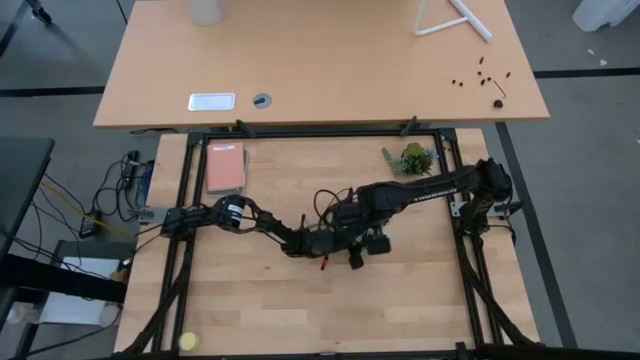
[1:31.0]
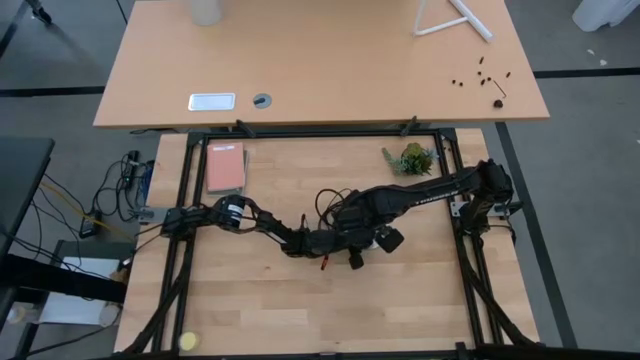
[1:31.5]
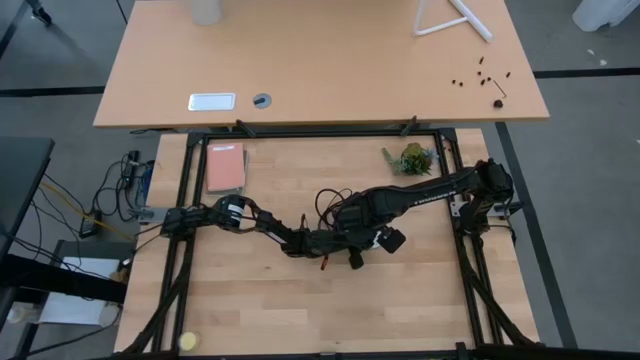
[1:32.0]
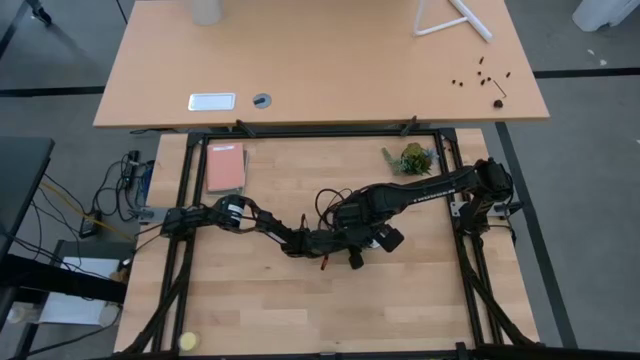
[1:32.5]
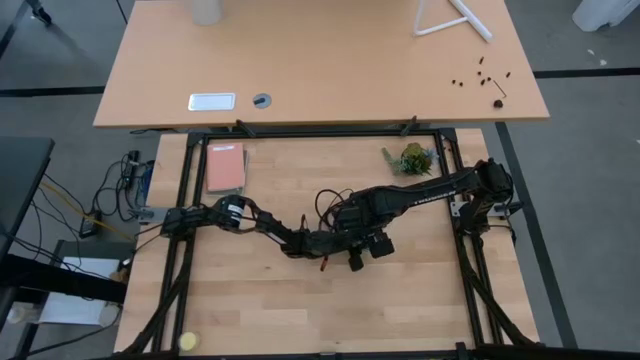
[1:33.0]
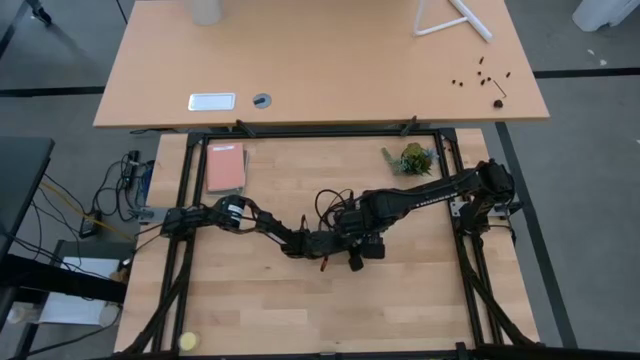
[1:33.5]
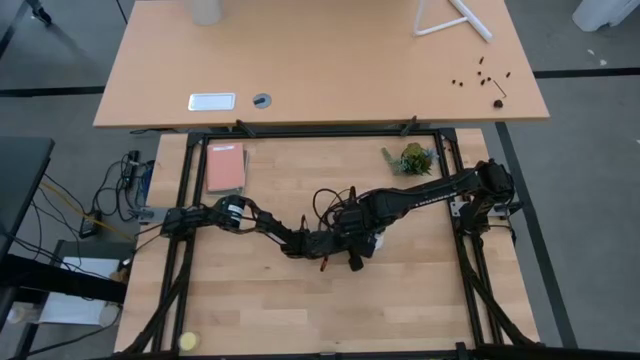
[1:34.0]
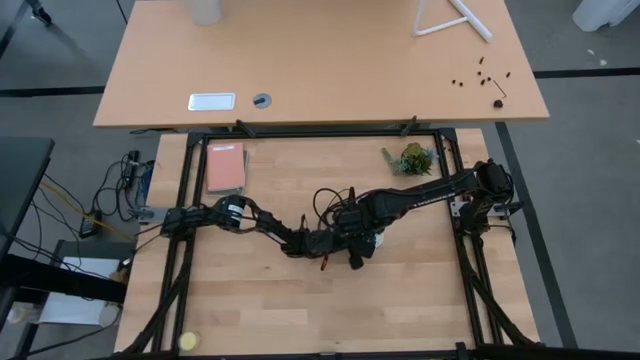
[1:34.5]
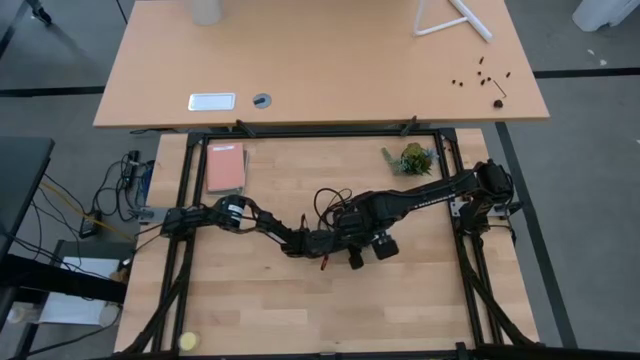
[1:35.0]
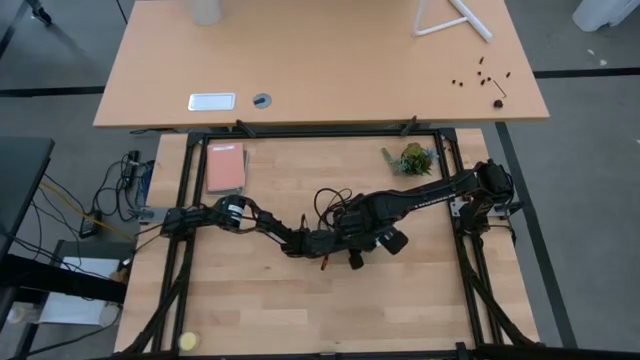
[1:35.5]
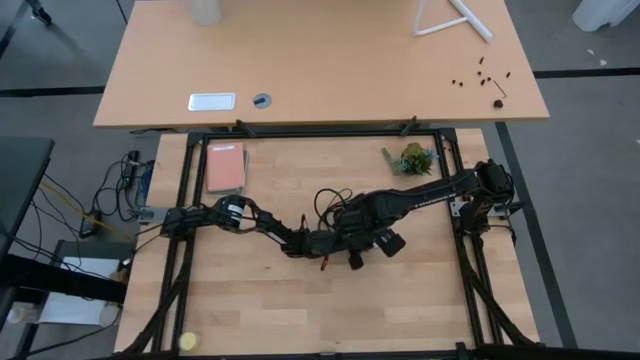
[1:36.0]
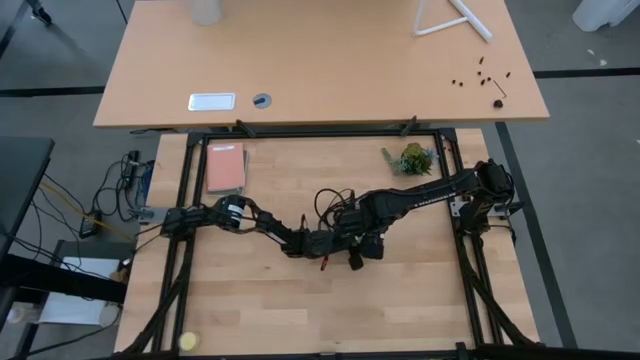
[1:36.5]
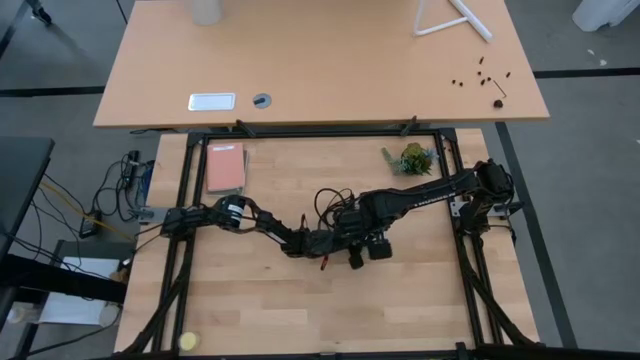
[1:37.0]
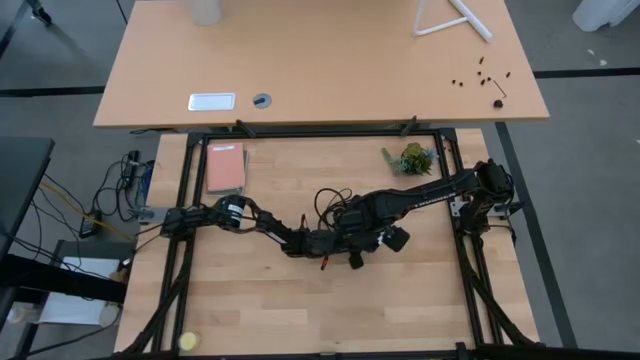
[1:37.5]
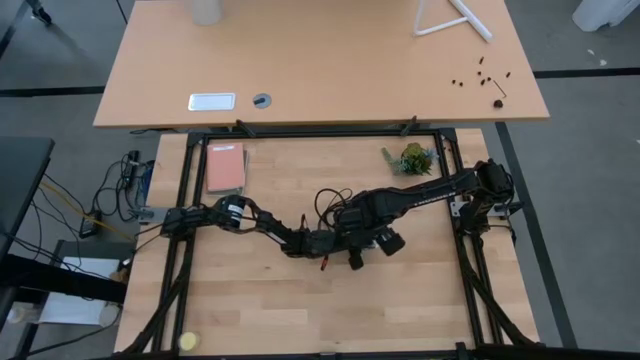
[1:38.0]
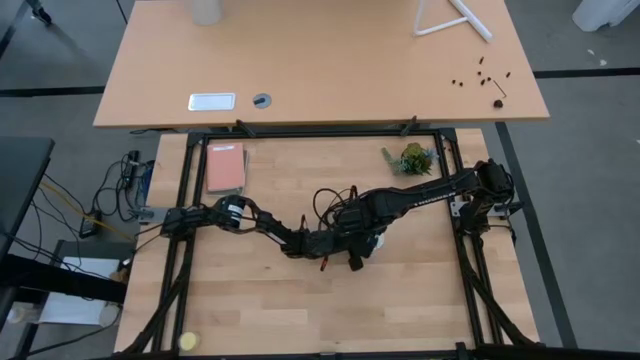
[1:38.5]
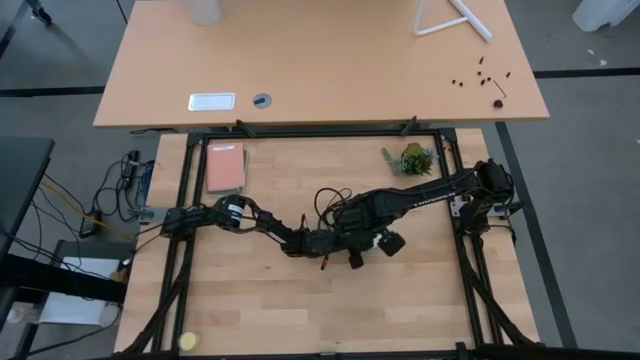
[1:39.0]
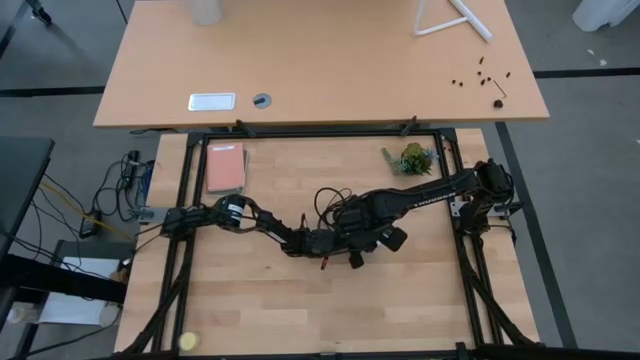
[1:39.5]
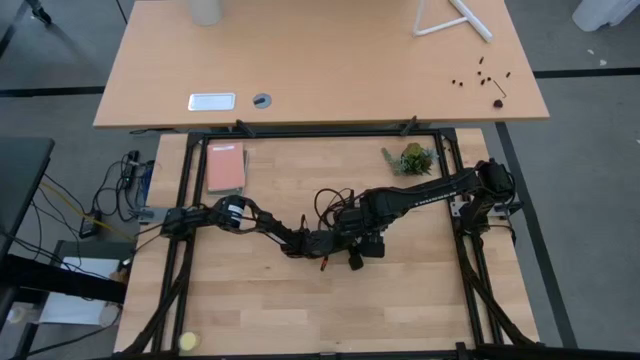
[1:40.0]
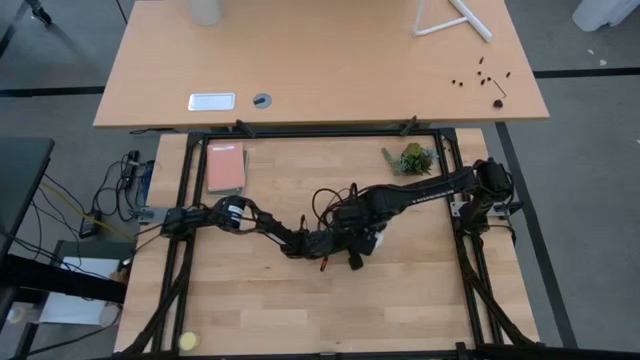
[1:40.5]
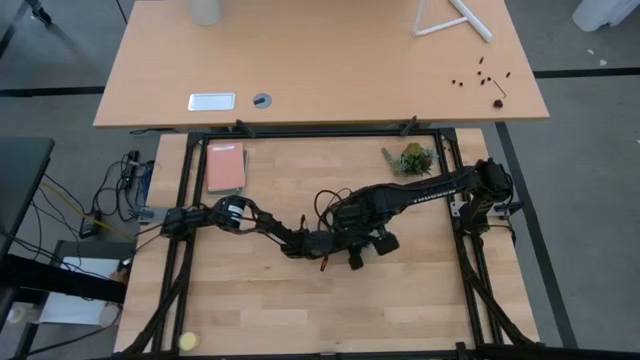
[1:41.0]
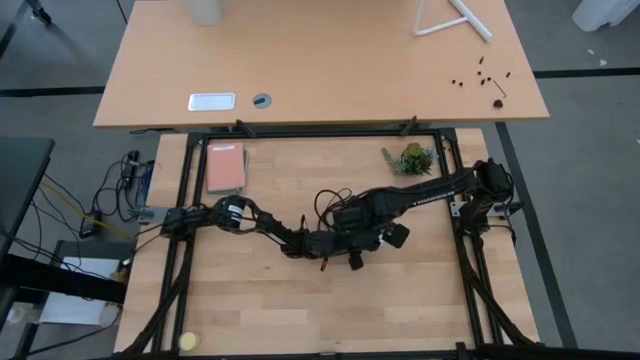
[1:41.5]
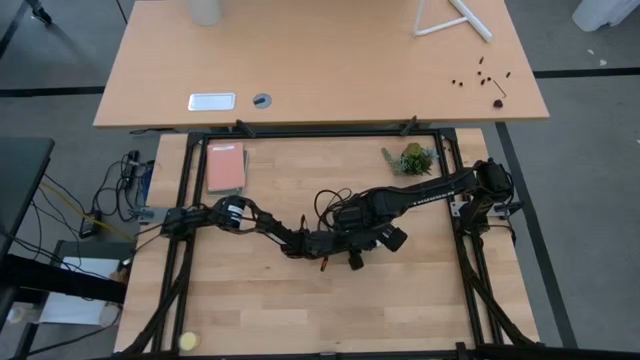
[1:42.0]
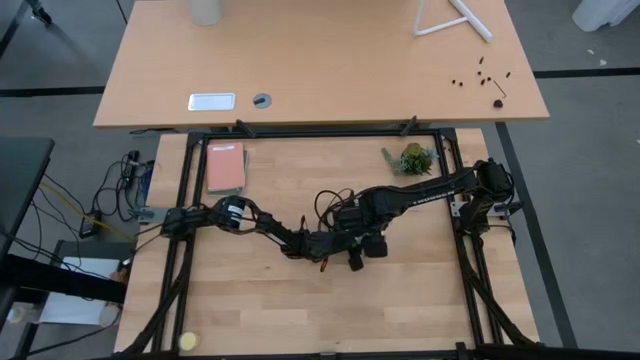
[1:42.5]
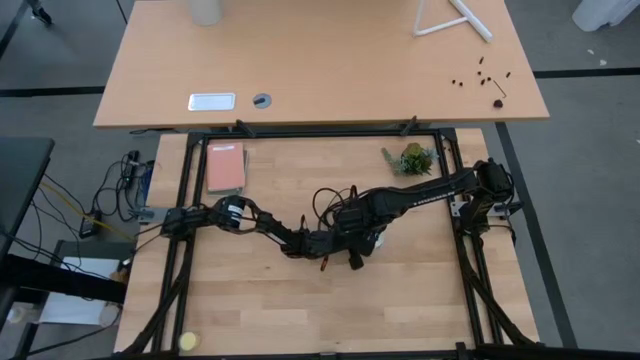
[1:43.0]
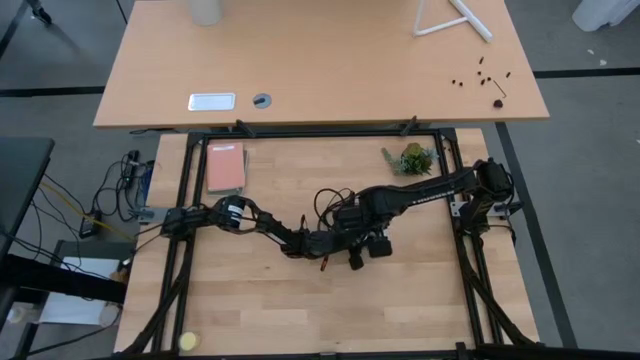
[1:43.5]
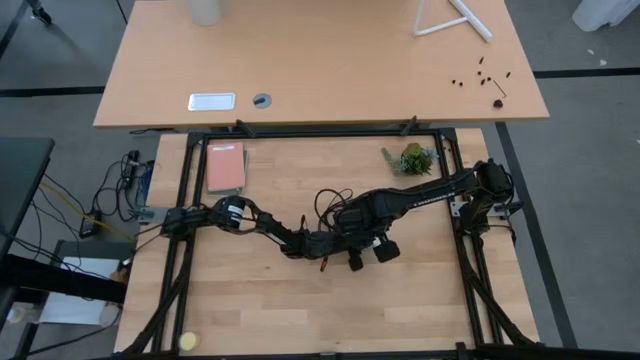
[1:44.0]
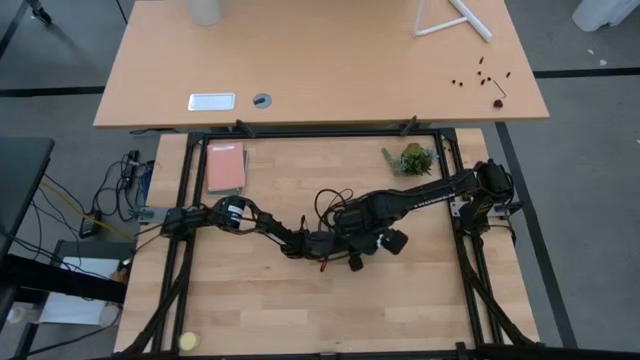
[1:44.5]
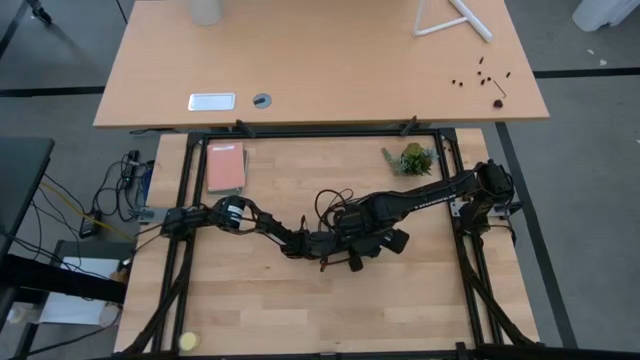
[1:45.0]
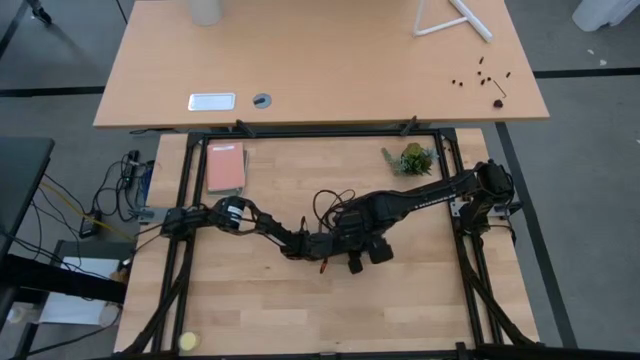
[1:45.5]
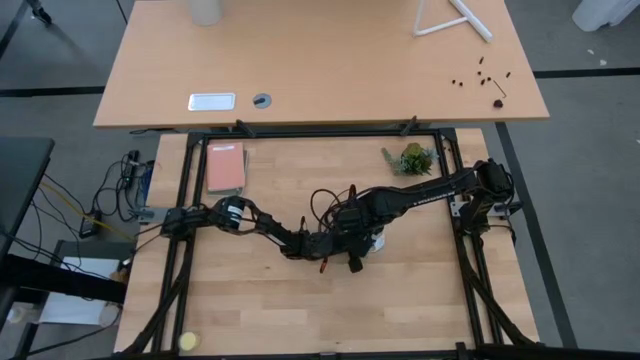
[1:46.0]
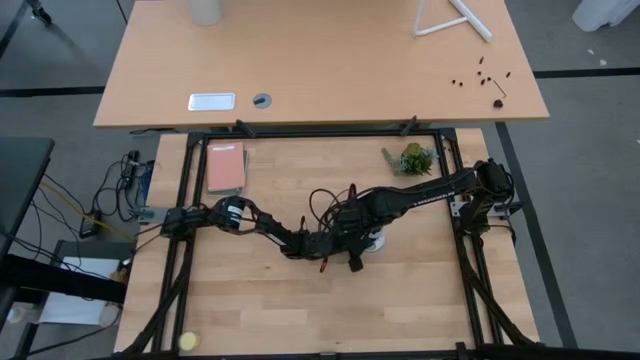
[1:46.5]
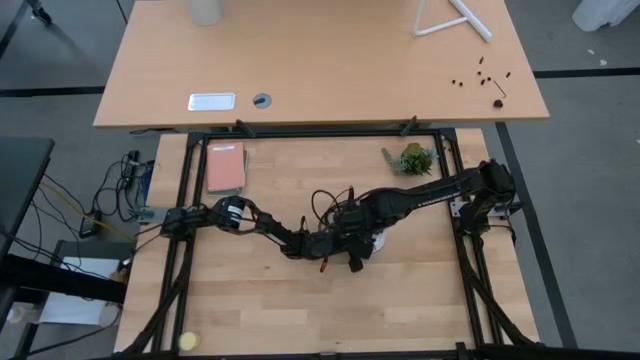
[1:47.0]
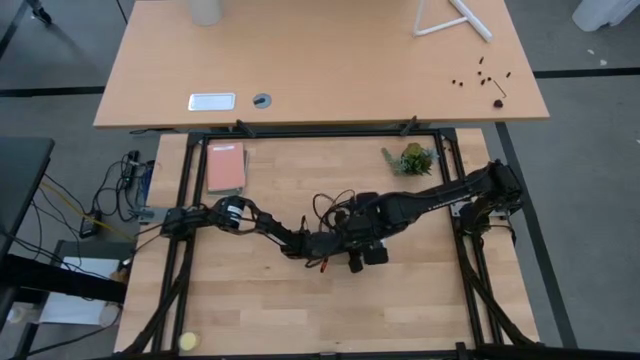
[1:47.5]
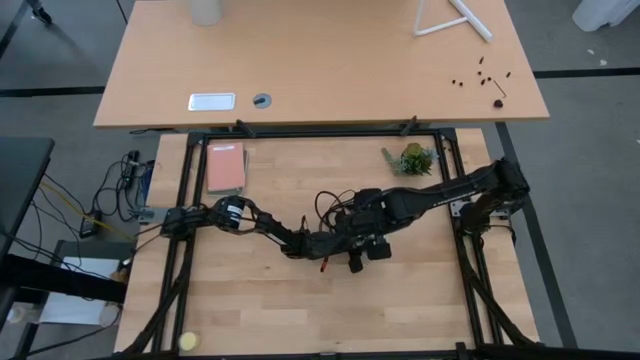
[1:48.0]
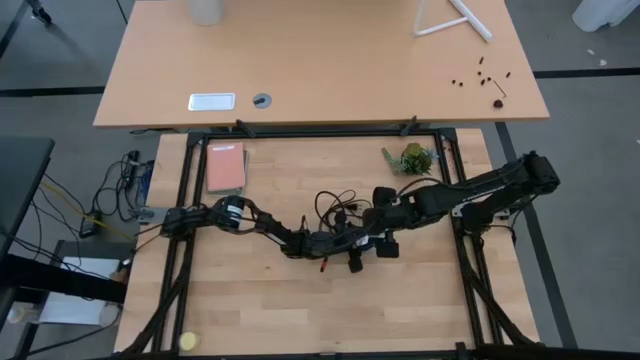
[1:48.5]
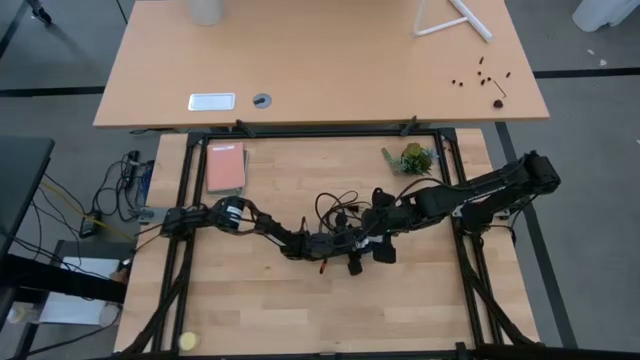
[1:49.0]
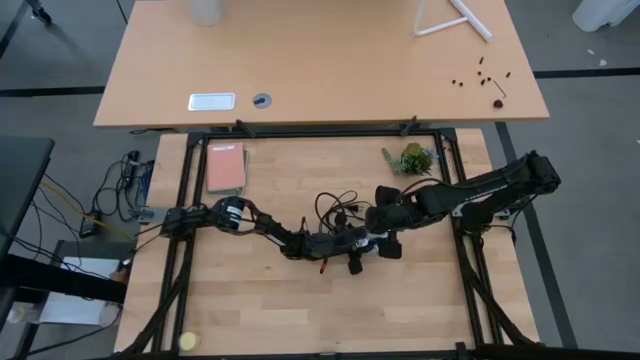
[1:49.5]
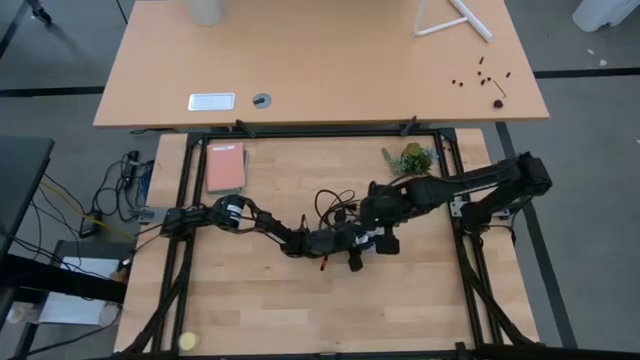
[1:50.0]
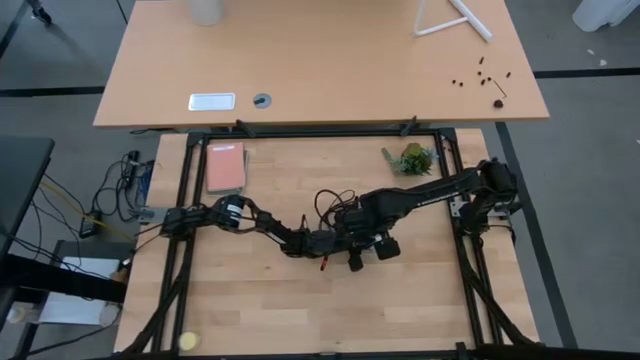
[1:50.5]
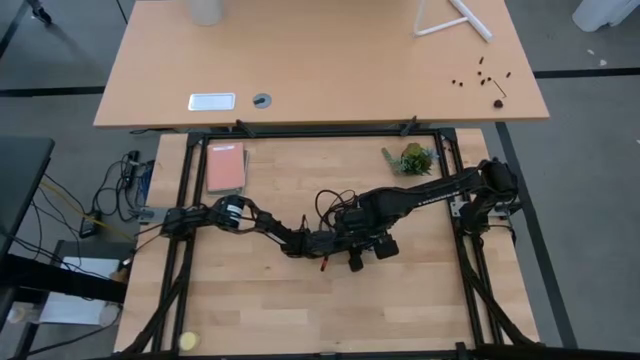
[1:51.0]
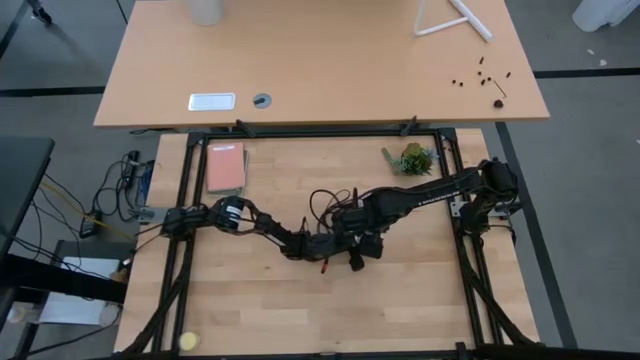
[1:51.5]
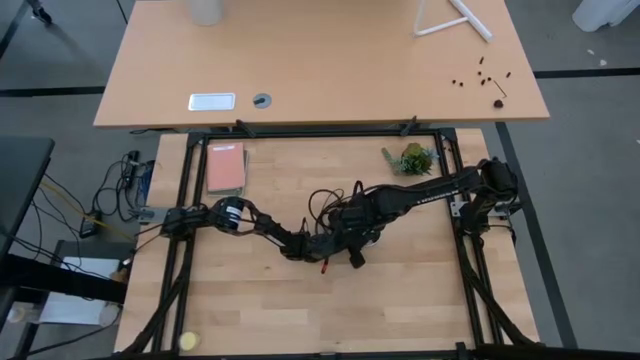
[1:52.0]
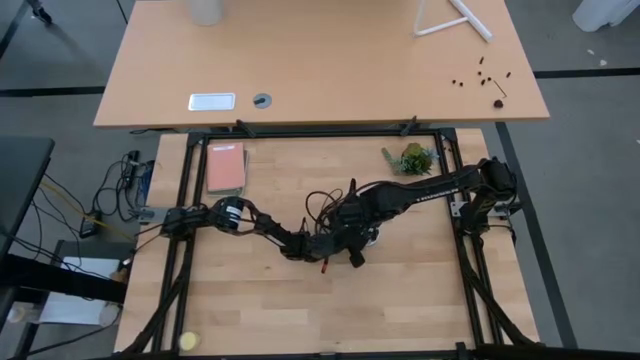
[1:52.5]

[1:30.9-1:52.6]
Task: Screw lightbulb
Insert the lightbulb into the lamp
